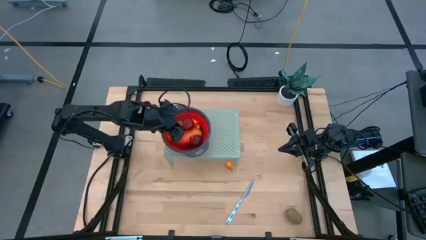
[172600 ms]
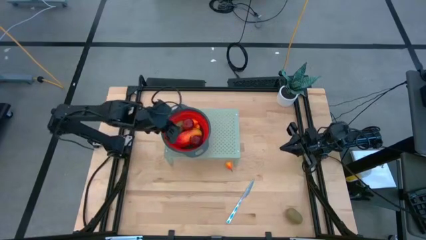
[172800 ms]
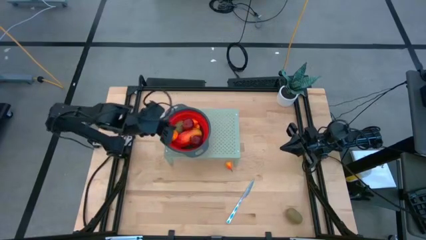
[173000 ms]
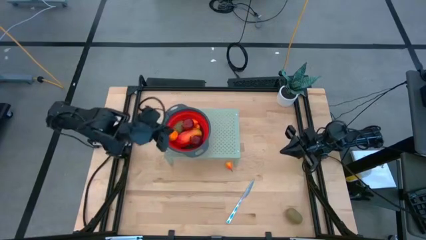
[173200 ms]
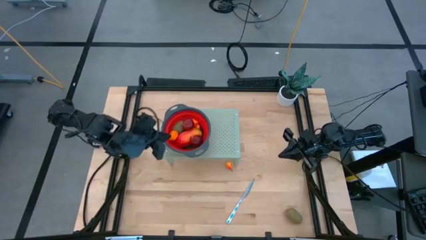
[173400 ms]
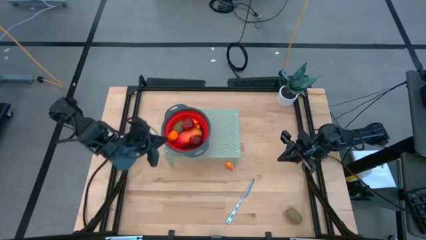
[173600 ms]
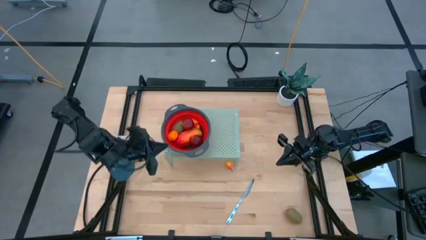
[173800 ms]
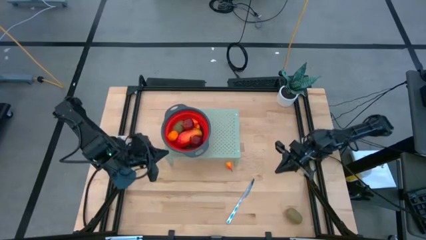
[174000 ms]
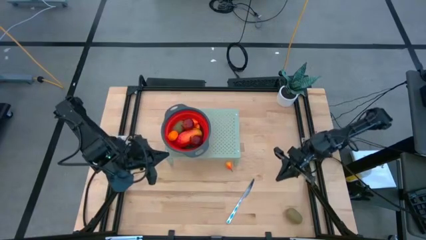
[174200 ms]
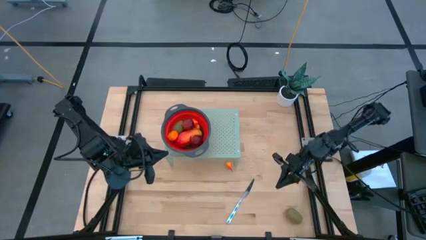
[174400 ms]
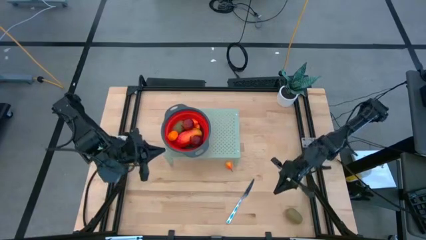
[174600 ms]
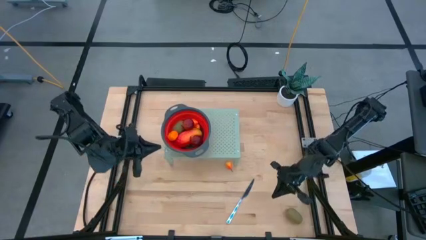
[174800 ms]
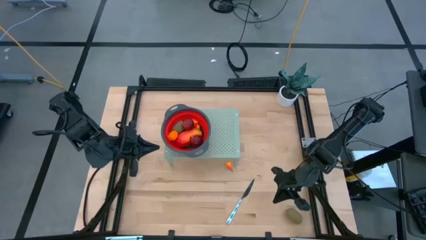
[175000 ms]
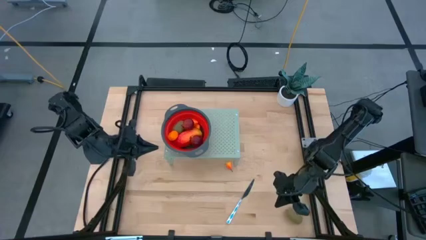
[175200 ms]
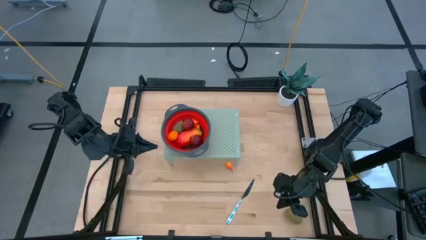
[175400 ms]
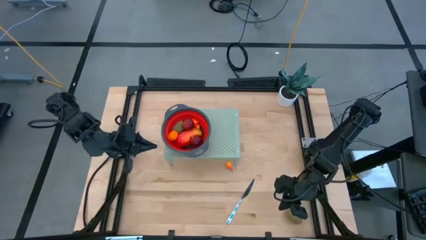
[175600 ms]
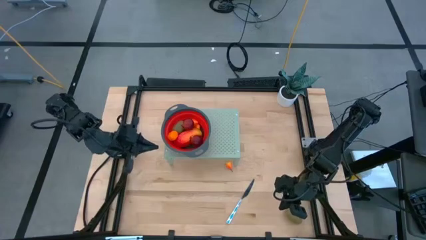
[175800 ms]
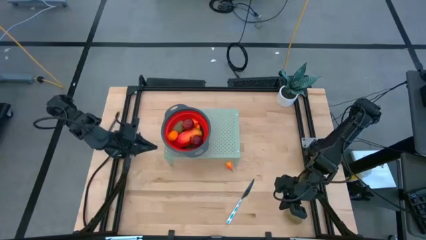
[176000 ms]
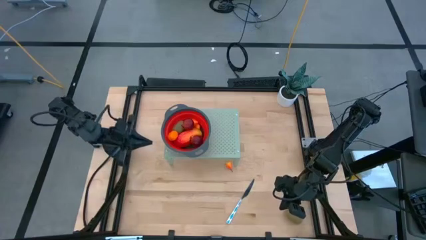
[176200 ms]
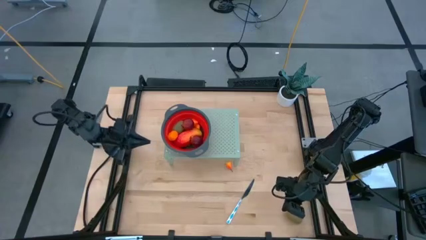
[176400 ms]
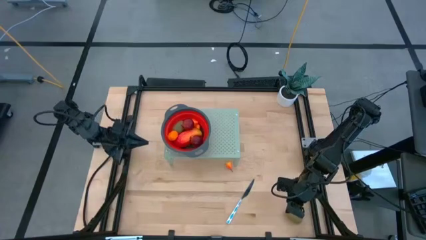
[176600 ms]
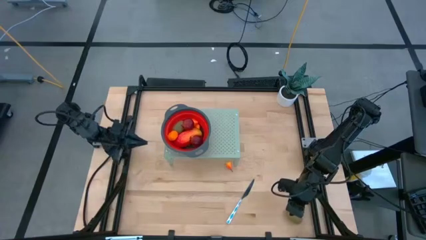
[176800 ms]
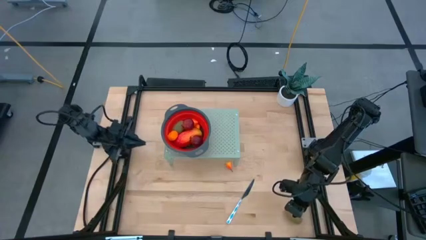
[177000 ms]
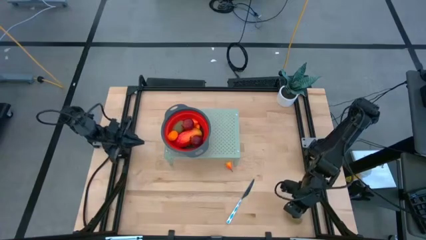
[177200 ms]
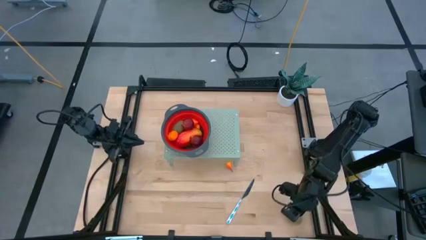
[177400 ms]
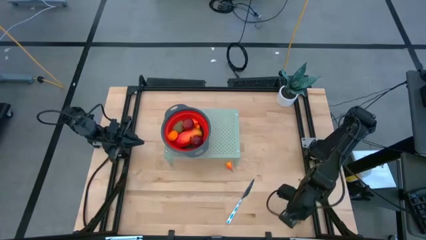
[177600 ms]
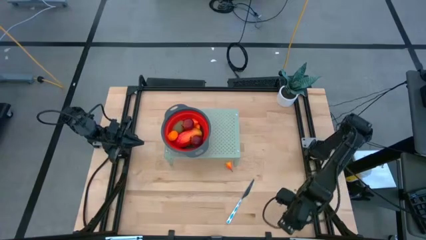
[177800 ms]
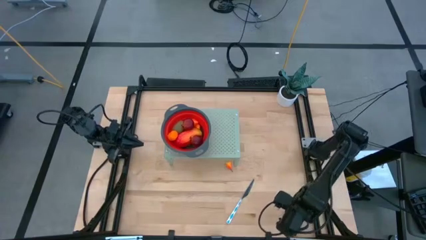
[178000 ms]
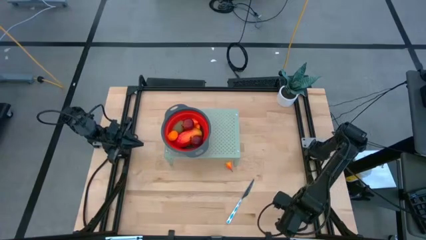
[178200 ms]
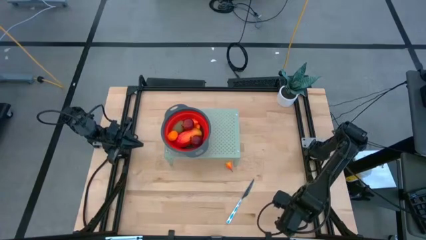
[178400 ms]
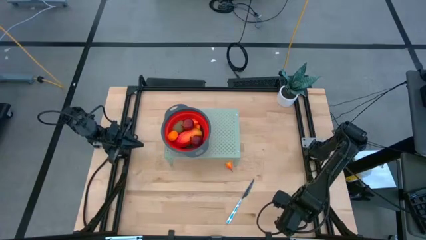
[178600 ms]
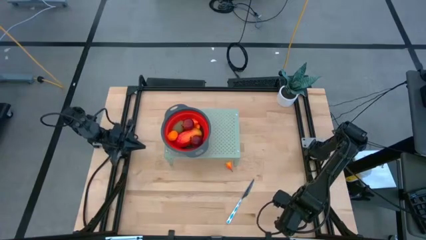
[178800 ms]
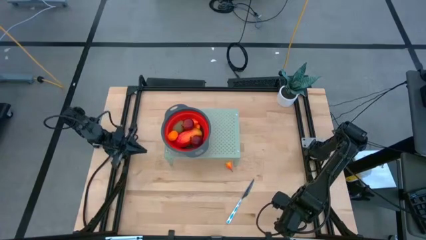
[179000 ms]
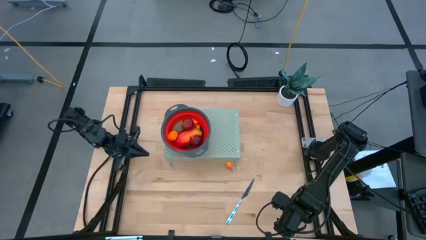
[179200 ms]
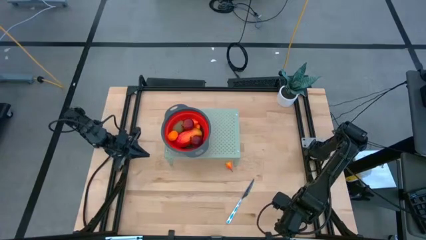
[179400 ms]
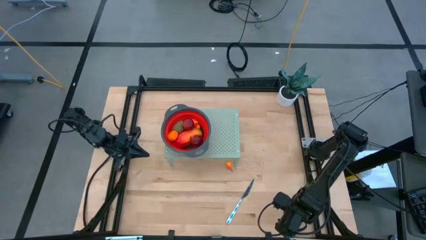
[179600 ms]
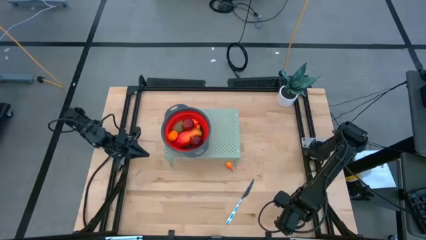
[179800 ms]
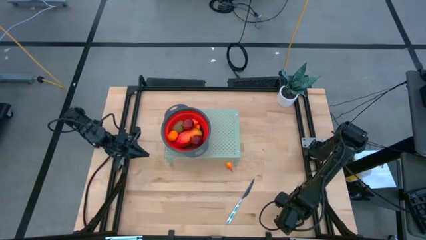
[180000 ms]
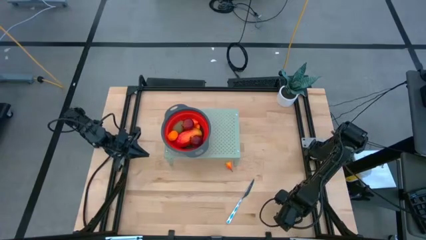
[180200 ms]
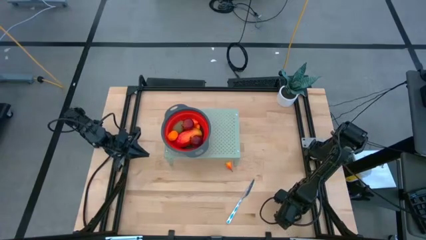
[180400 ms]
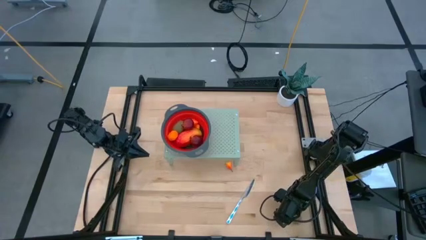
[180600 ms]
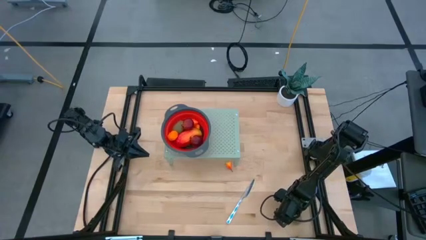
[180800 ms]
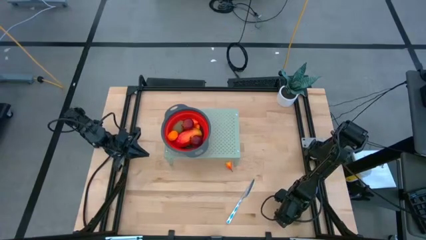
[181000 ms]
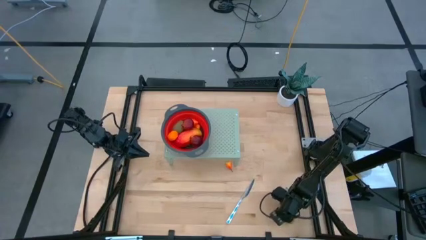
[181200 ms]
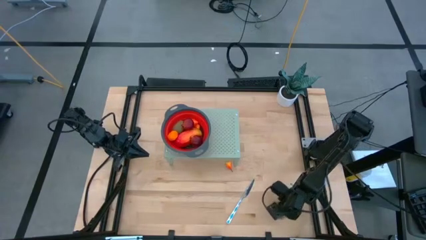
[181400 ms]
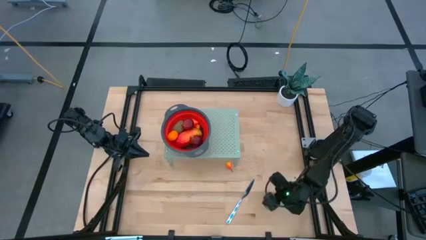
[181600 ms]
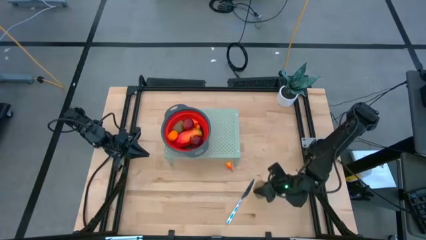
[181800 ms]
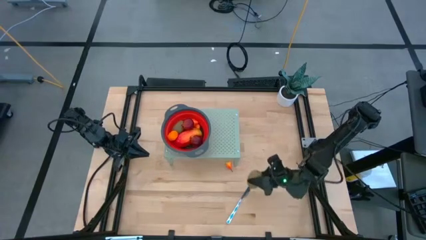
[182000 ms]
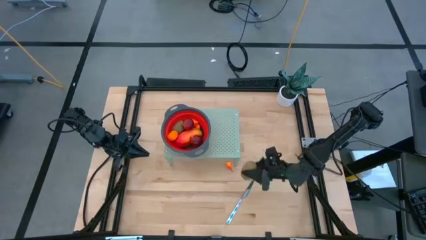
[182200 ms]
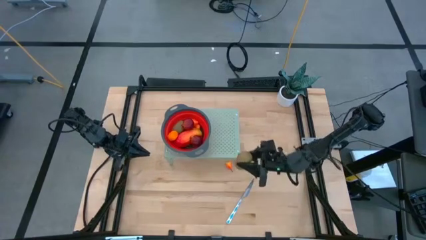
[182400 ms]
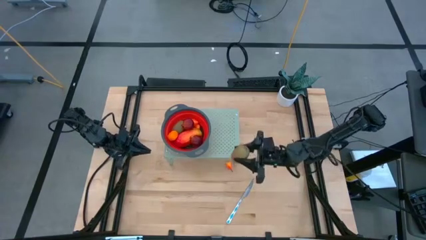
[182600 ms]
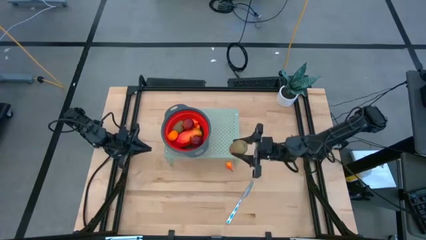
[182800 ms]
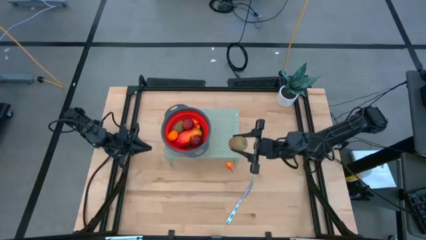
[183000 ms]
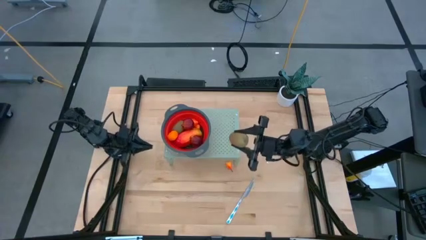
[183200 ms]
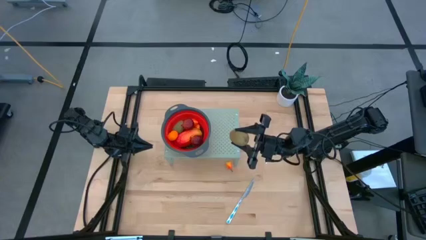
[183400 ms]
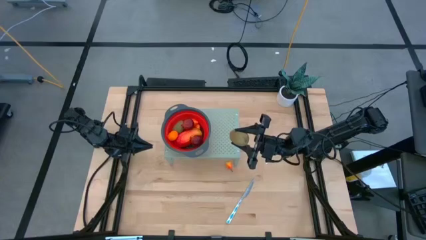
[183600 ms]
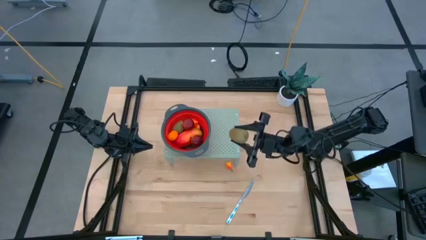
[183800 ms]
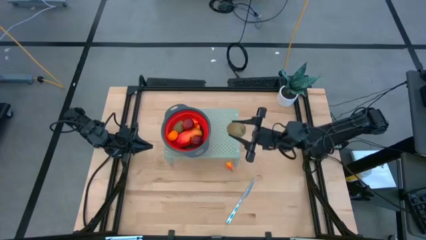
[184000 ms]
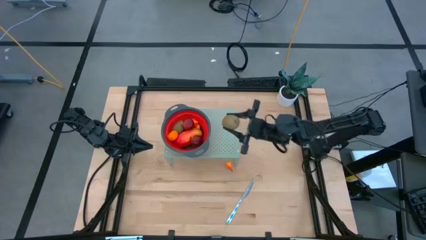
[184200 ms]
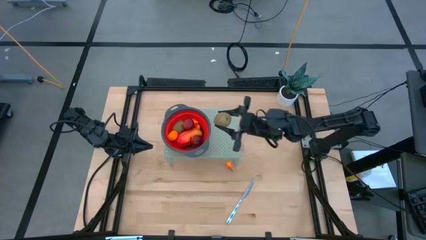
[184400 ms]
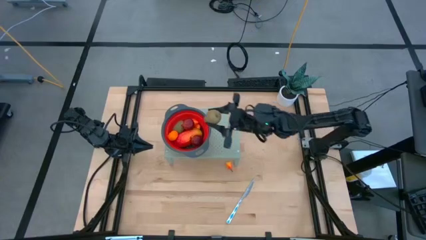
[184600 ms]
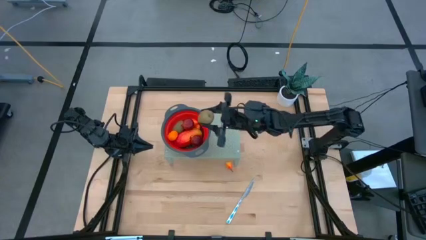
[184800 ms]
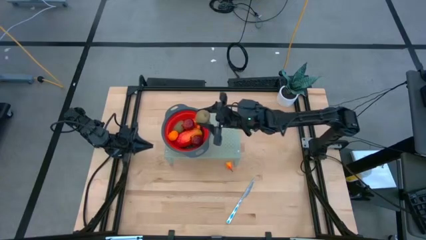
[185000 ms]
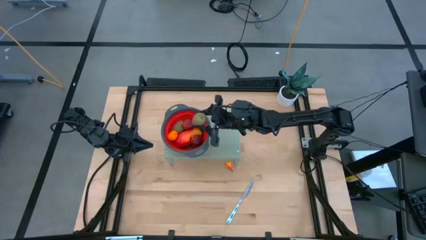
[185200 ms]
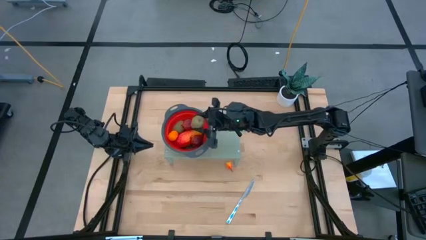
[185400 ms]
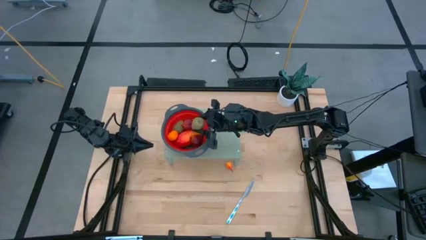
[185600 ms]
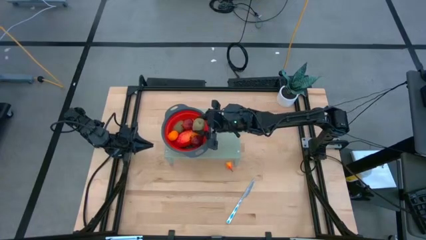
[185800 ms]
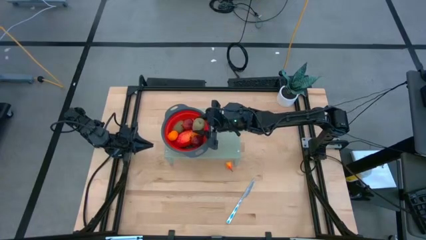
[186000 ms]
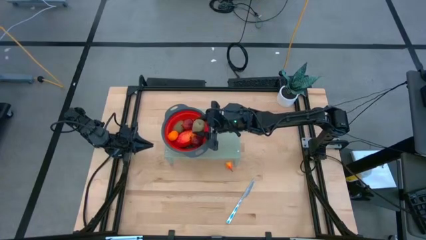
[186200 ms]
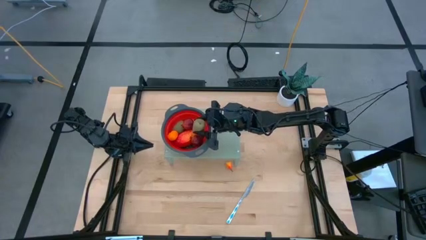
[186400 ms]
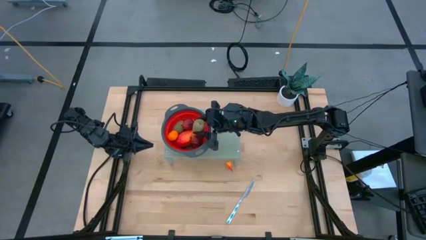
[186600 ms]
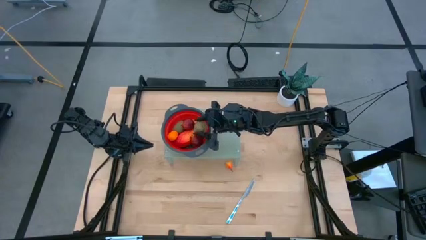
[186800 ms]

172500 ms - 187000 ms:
Task: Pick & Place Fruit
Put the kiwi into the red strainer bowl on the shelf

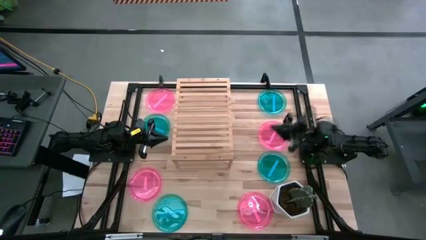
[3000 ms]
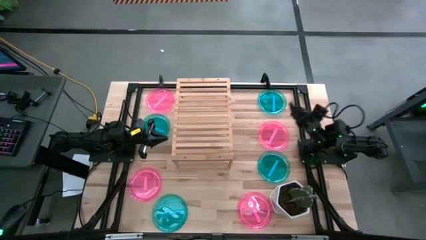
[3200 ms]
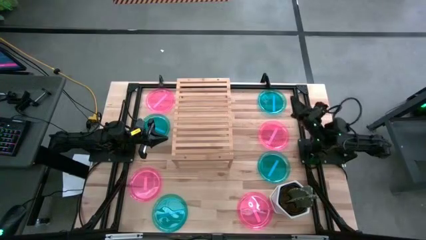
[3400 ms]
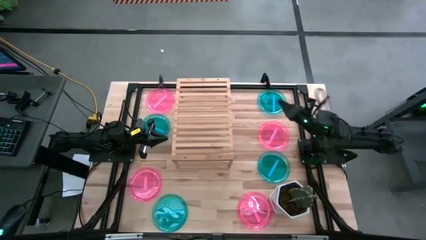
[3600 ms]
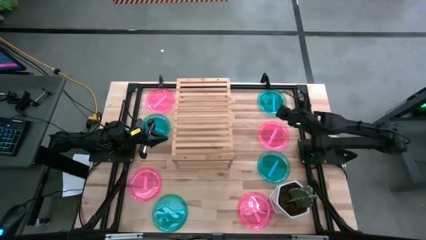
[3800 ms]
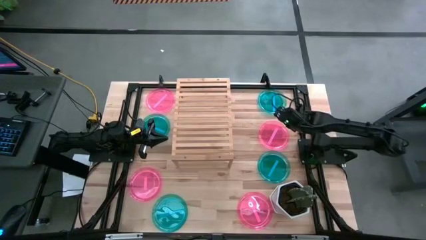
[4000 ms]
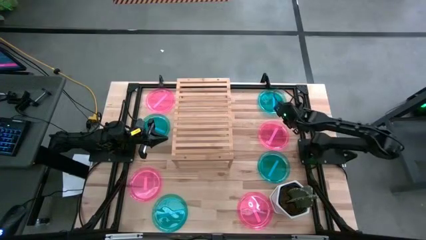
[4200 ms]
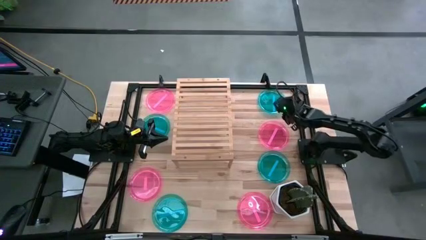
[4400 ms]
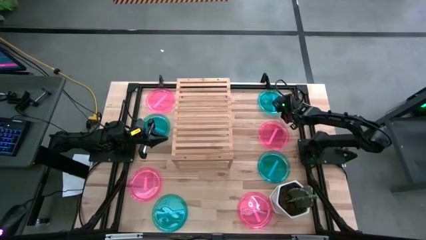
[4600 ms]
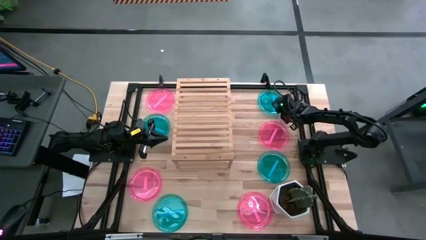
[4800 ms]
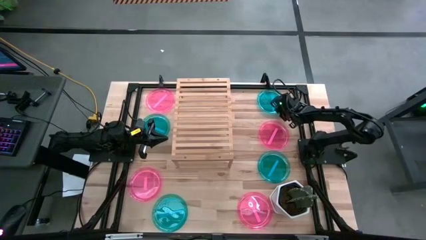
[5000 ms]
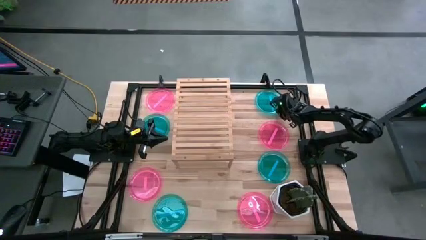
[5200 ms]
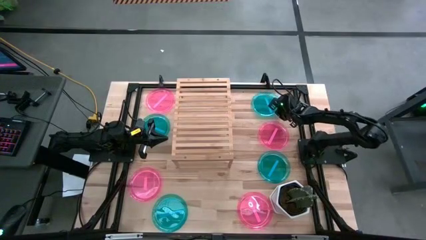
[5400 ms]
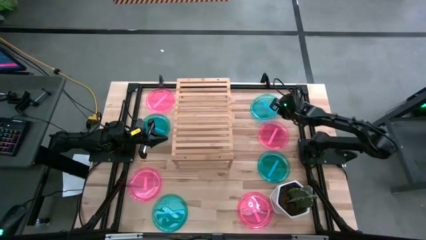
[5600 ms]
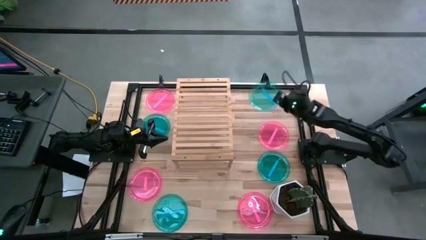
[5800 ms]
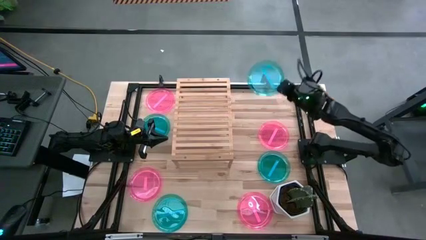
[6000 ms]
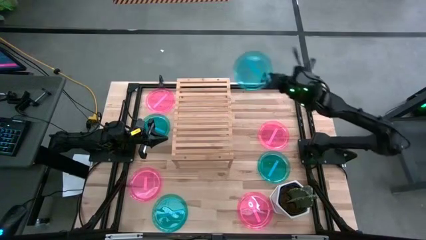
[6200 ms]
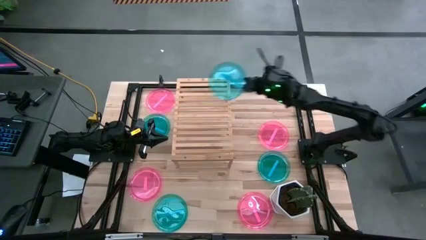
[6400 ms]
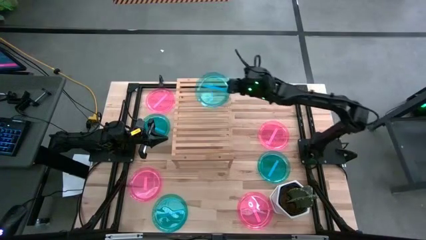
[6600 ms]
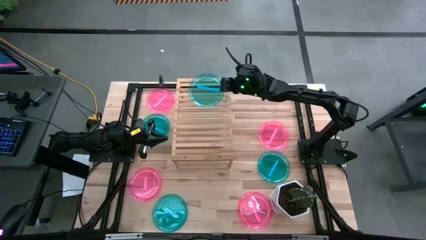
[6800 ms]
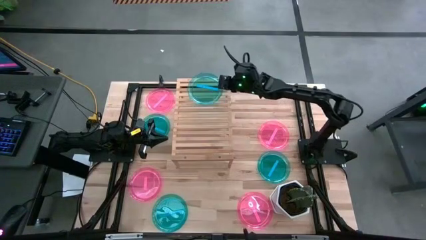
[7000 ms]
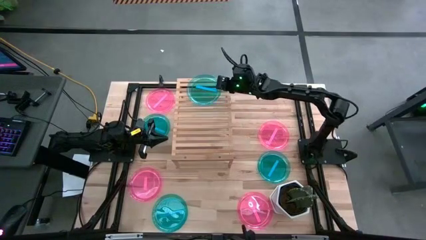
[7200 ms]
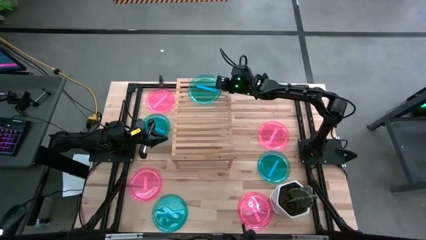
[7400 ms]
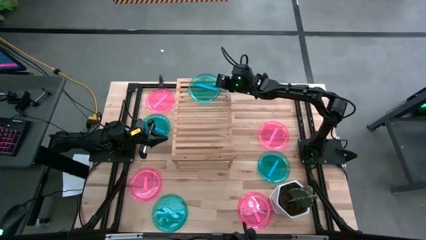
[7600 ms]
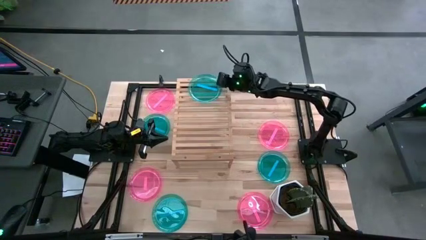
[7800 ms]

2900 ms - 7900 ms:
Task: Place and stack plates onto a shelf
Put the blue plate on the shelf
